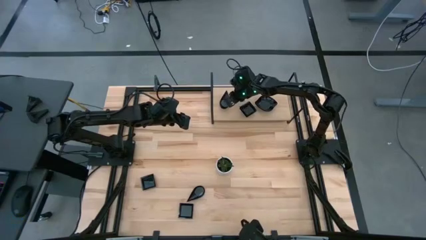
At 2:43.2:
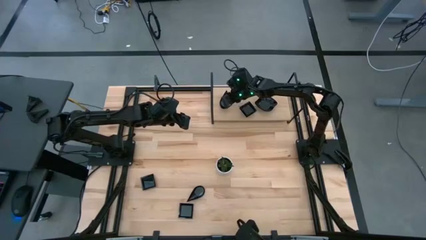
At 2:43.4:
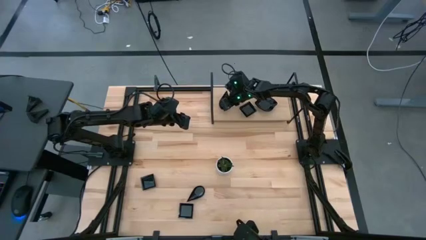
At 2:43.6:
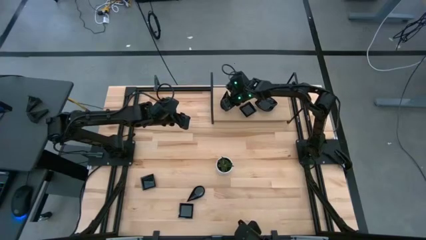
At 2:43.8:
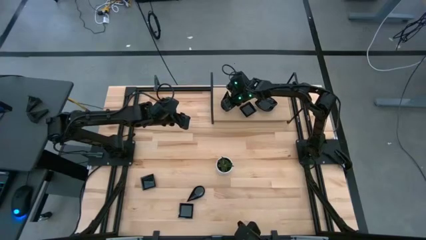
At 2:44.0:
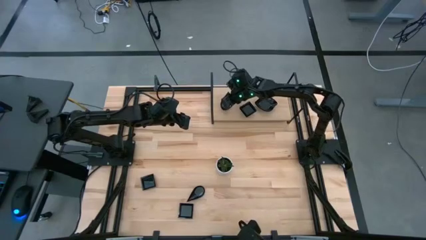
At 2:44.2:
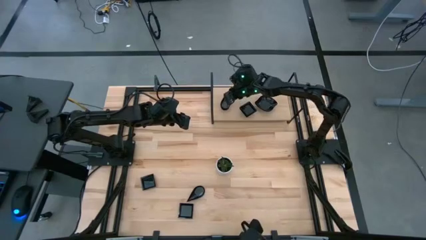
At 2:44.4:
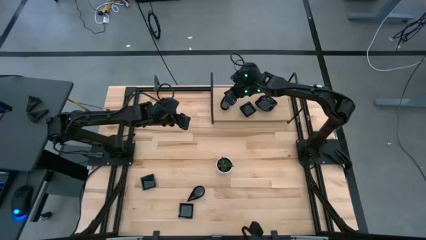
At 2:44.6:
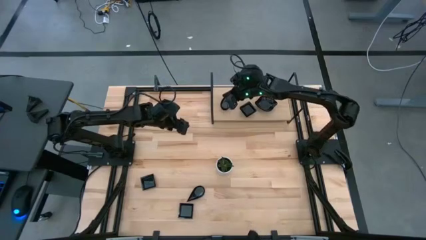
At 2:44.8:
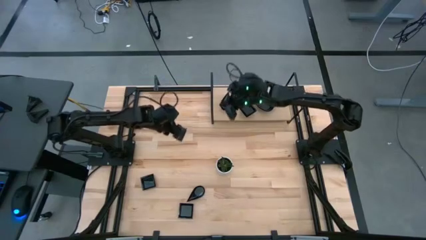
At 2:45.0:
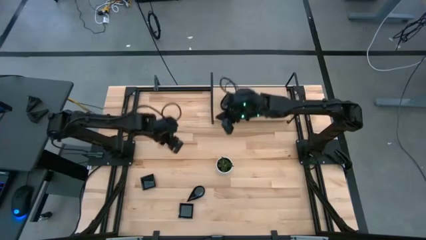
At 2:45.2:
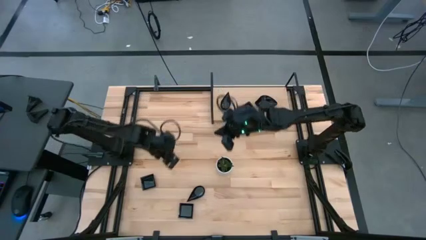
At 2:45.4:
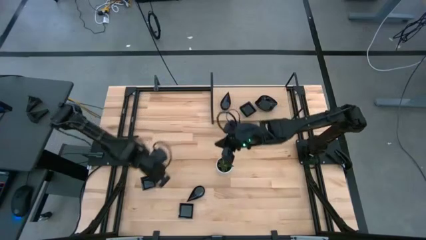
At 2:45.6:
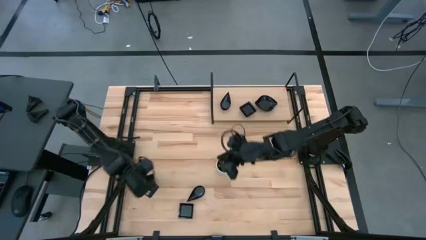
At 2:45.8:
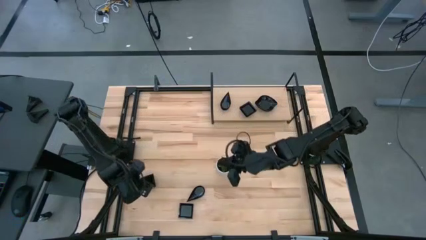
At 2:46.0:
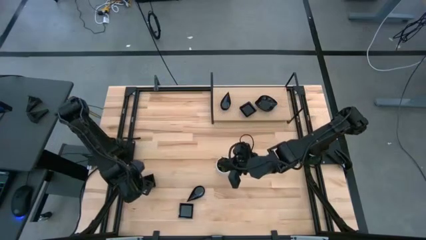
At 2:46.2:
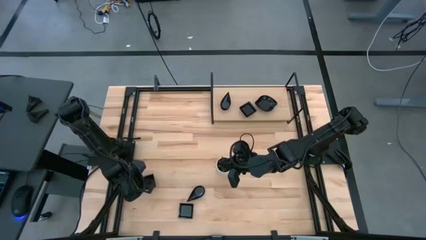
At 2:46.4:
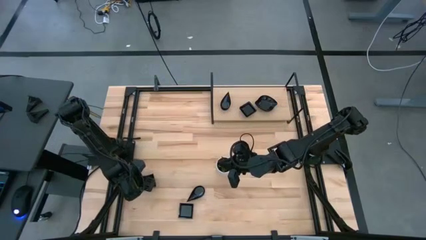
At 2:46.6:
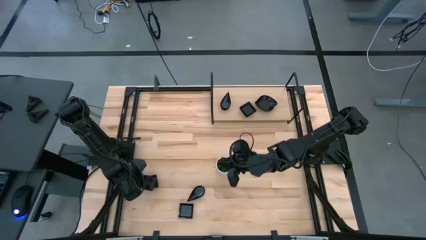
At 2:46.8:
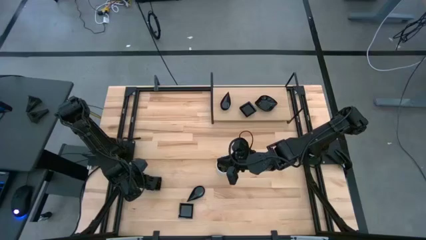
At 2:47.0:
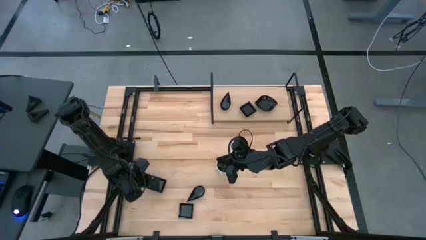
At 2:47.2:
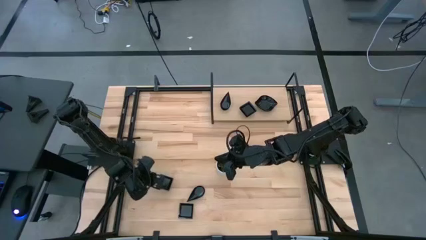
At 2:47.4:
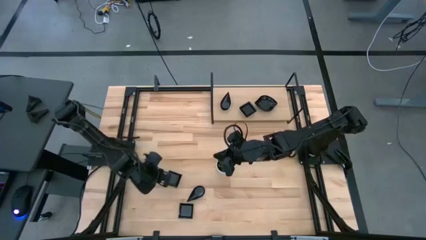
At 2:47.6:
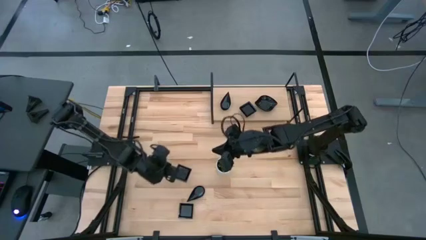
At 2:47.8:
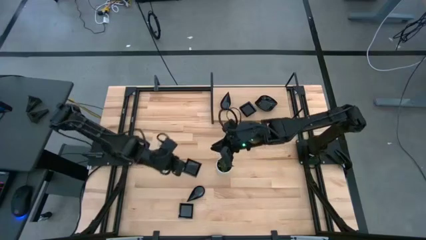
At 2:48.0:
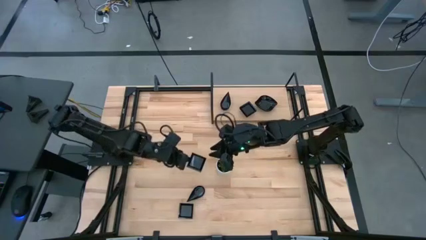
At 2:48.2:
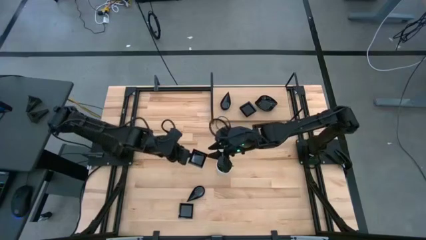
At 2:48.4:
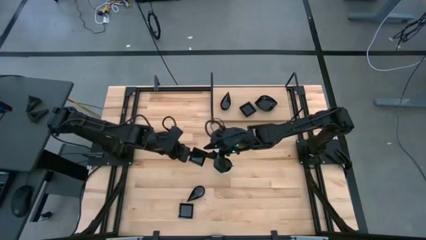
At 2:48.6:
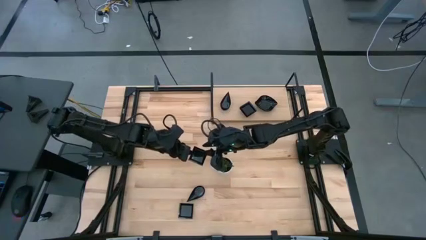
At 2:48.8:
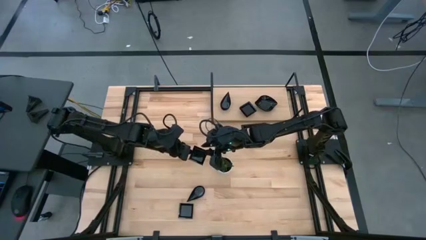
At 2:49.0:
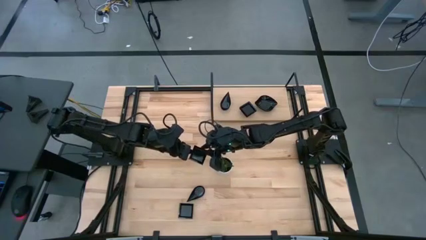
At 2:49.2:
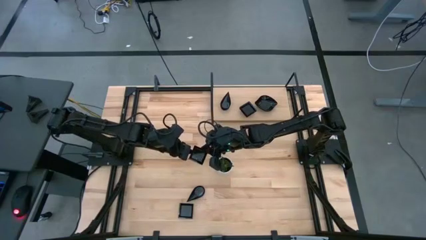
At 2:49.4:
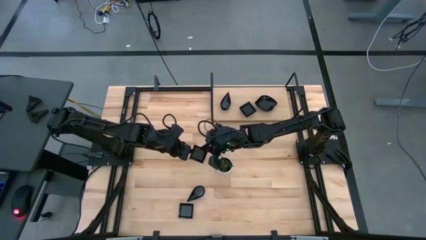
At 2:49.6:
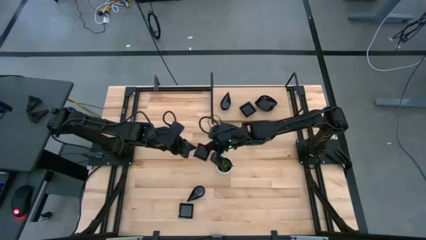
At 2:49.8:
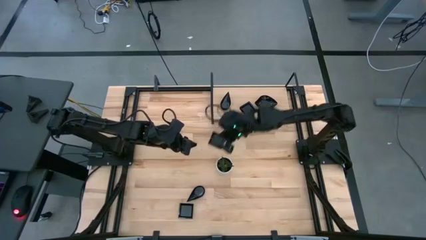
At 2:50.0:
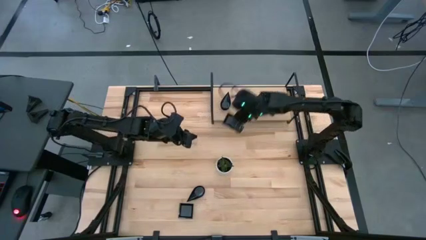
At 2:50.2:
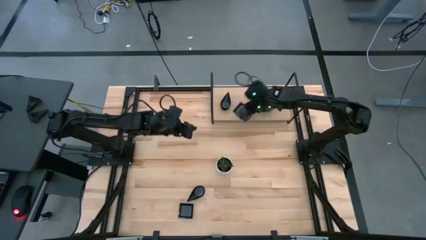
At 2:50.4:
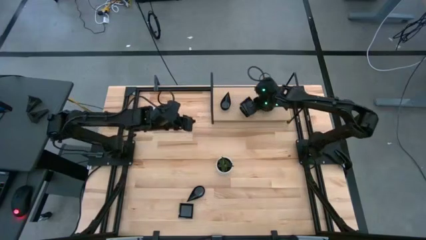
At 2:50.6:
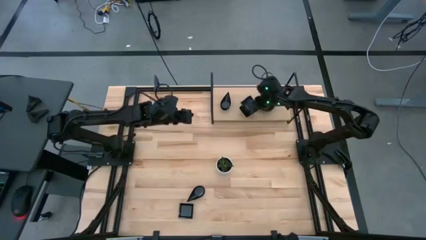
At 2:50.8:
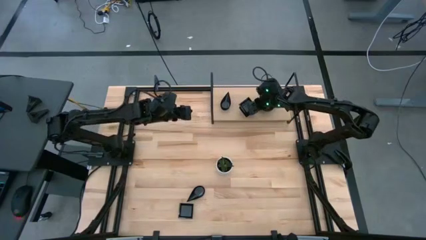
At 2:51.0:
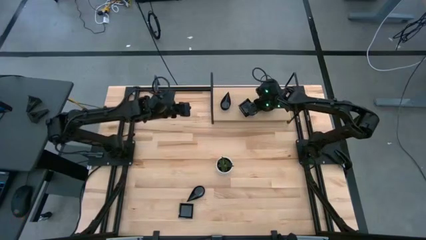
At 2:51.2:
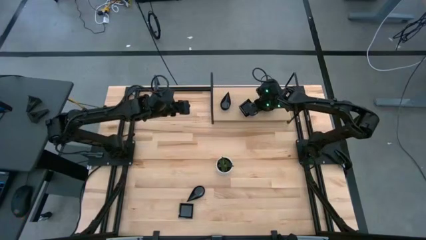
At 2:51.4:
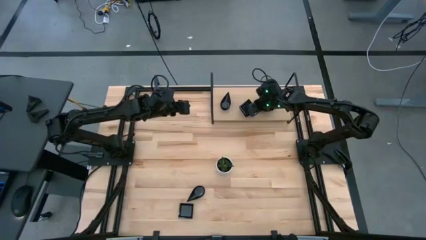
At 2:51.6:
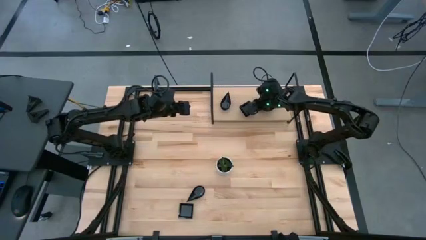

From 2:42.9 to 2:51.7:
Task: Pick & Place Mini shaped plates
Stack the square plate on top of the square plate on the shelf

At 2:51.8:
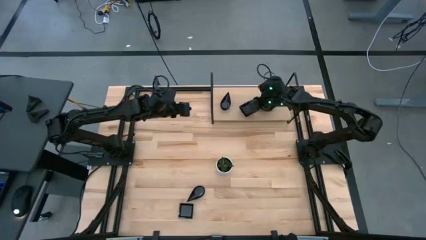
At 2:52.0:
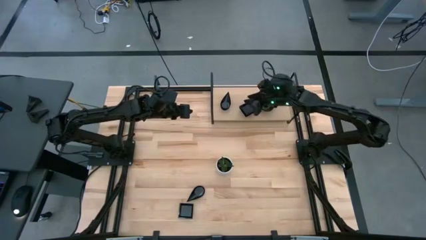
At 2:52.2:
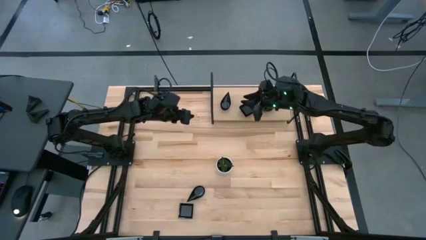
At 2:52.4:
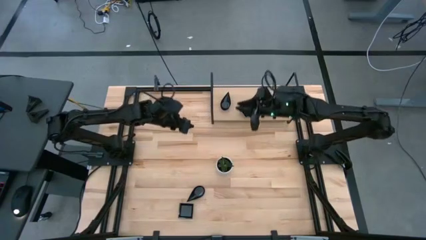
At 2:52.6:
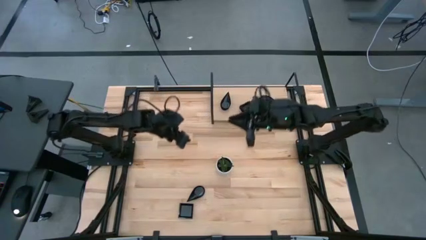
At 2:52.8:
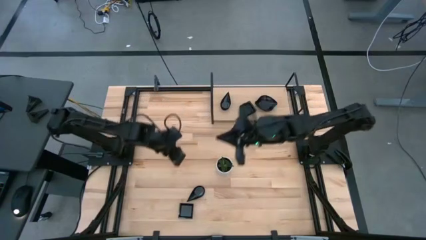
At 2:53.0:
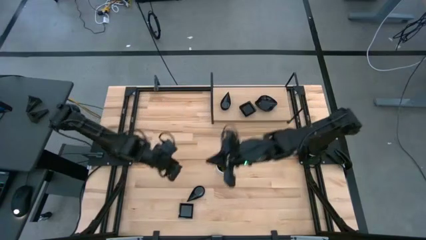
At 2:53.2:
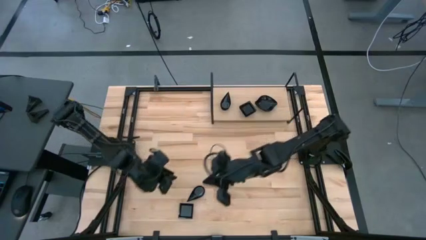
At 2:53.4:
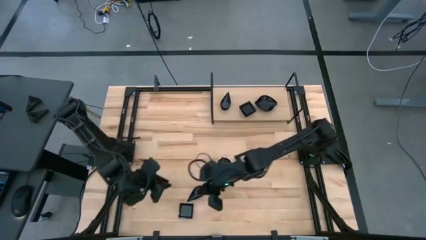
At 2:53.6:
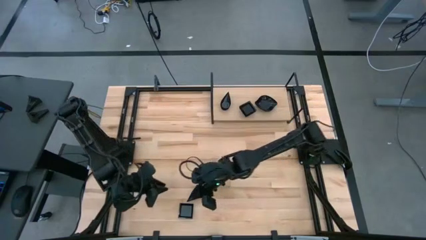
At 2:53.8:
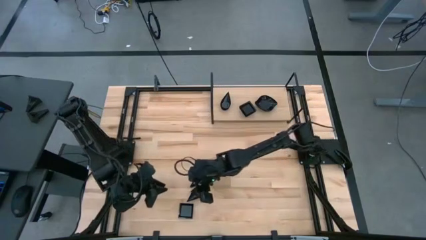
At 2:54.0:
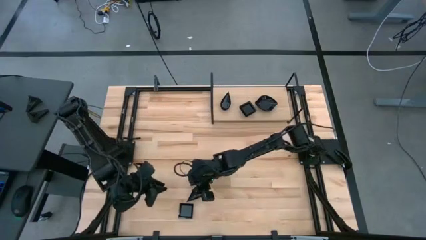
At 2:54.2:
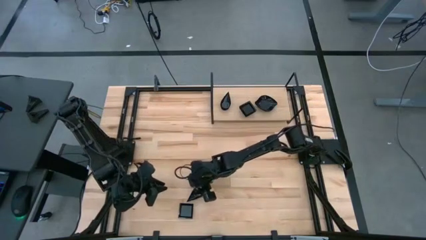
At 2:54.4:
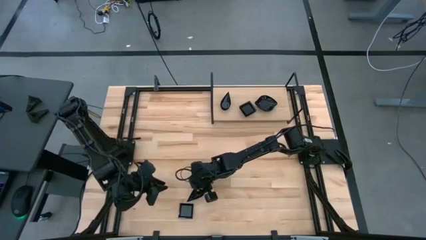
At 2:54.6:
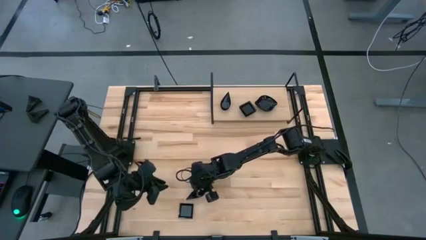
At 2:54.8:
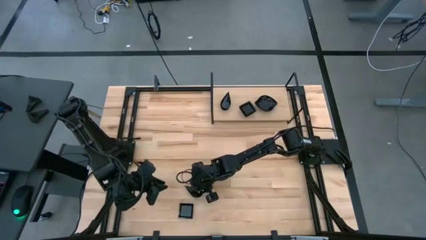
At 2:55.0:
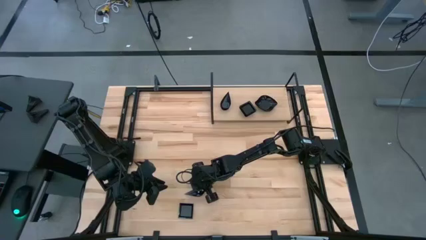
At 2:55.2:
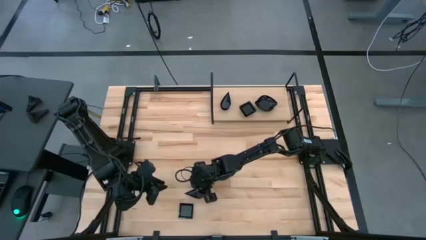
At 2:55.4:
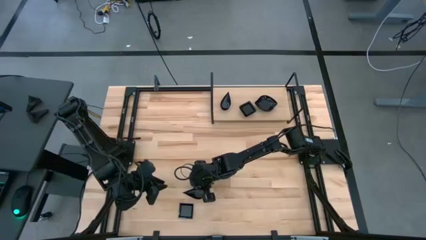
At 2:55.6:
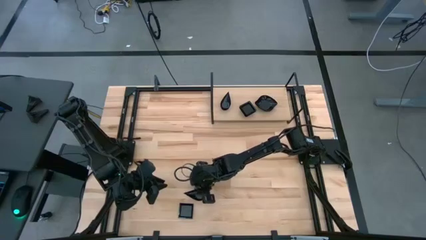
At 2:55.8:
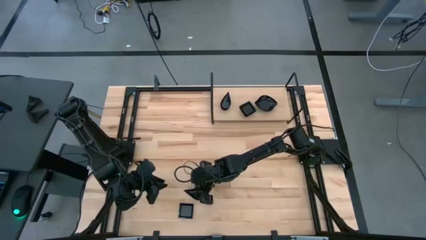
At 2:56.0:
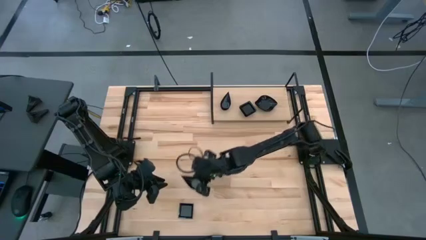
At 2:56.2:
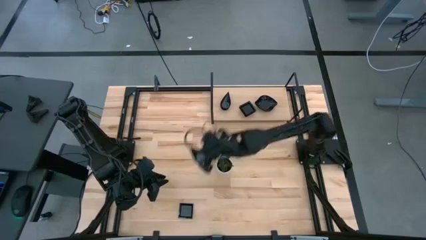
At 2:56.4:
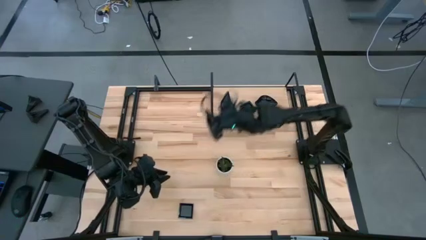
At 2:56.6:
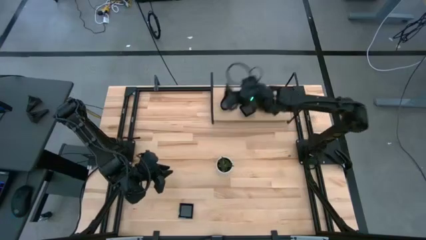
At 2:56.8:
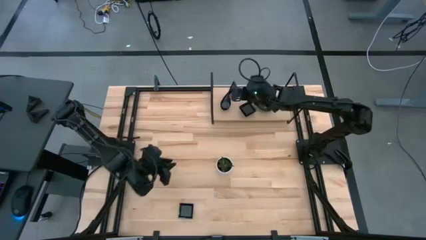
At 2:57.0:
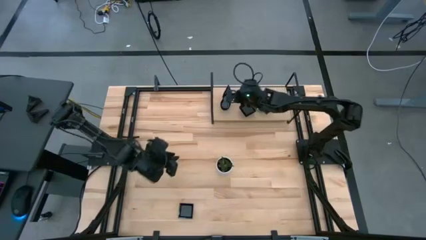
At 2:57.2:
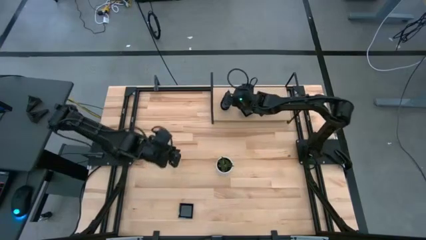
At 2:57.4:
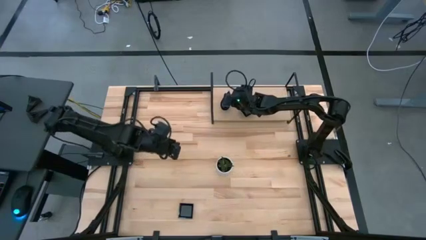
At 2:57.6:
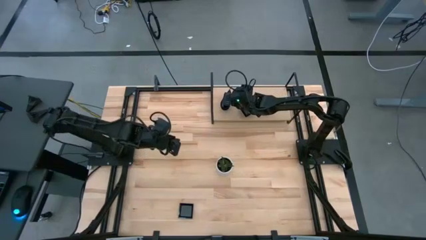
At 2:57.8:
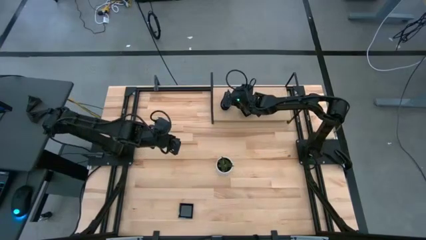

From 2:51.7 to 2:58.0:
Stack the drop shaped plate on top of the drop shaped plate on the shelf
